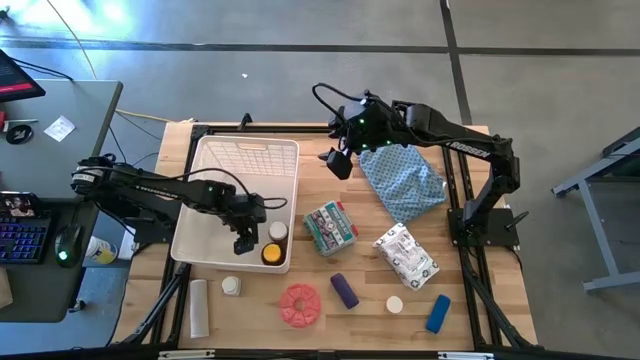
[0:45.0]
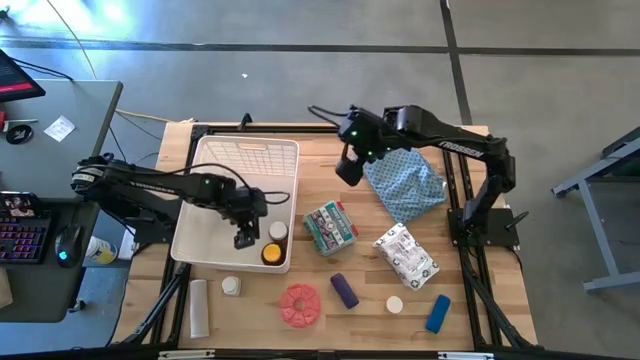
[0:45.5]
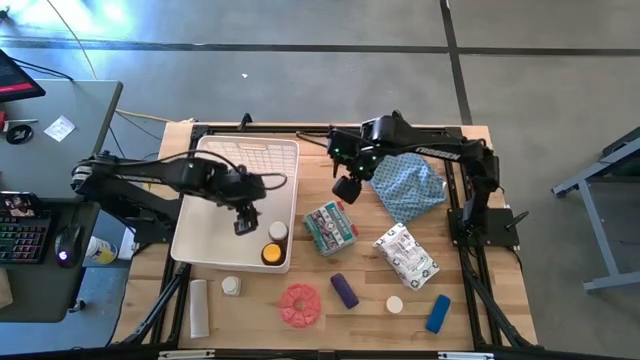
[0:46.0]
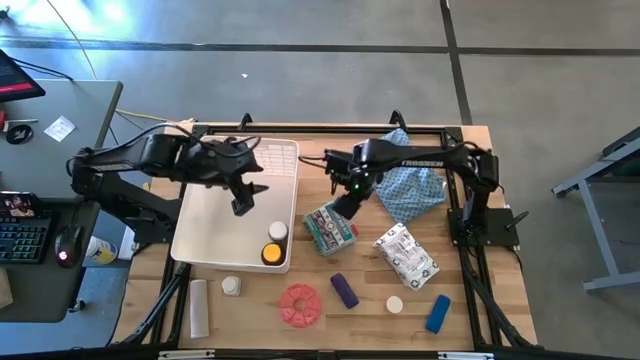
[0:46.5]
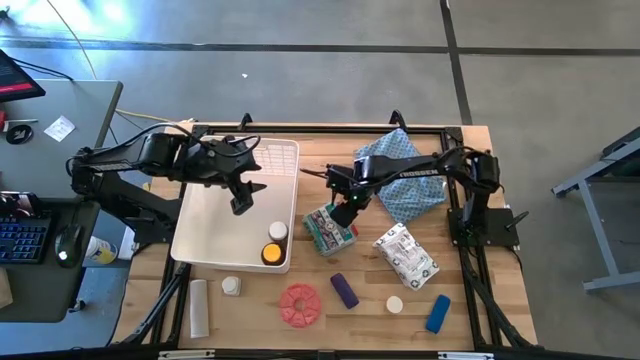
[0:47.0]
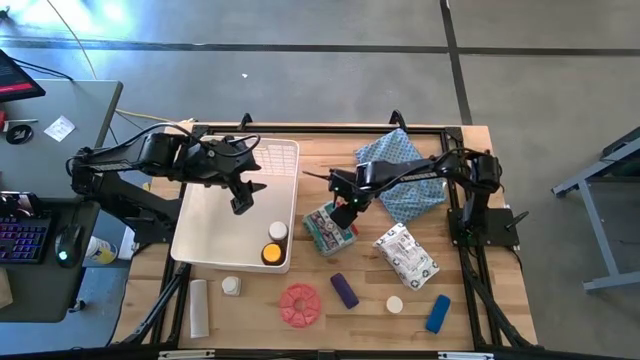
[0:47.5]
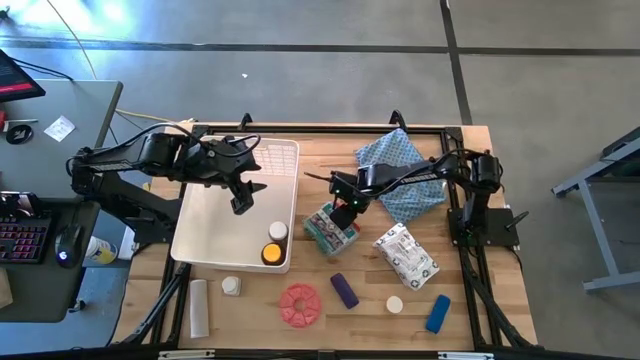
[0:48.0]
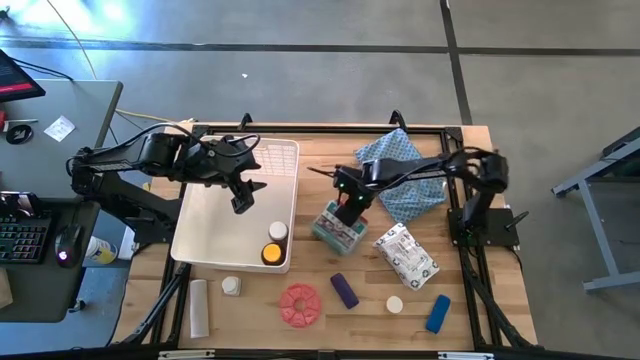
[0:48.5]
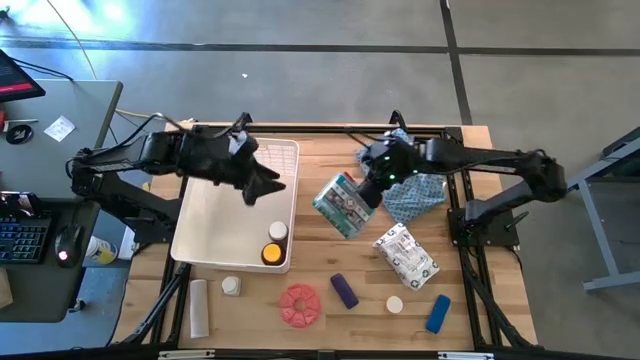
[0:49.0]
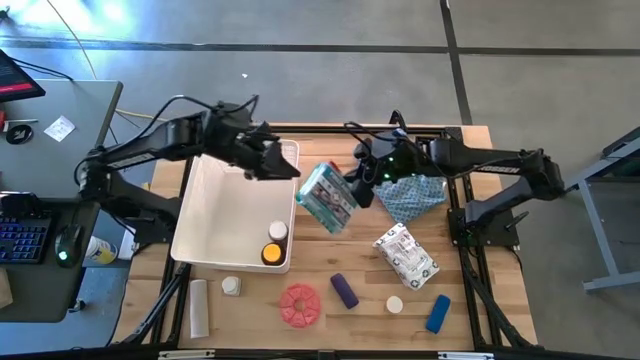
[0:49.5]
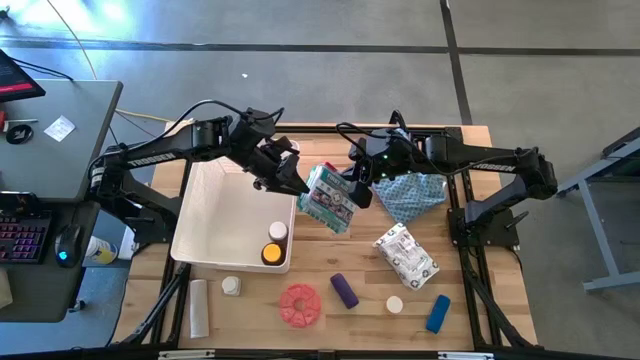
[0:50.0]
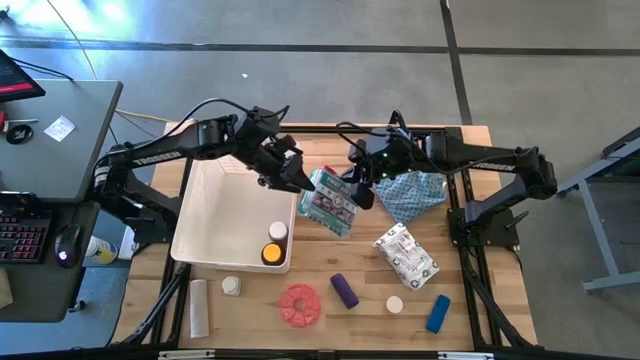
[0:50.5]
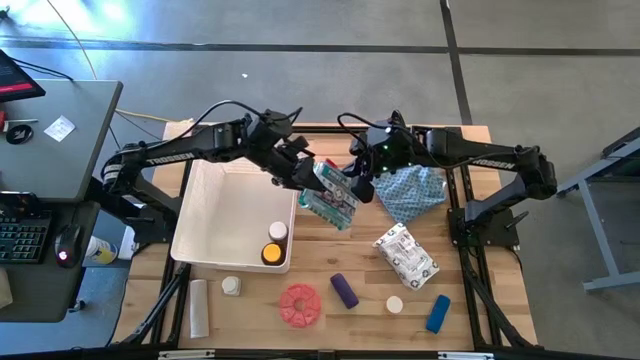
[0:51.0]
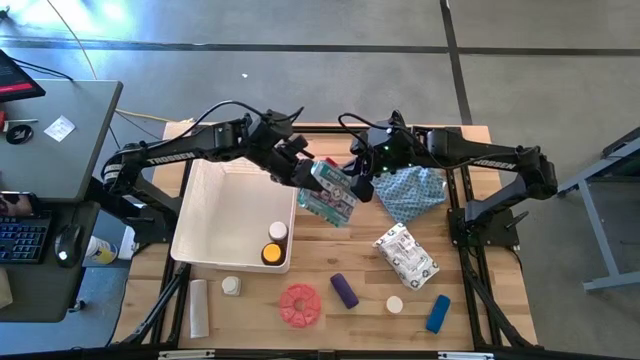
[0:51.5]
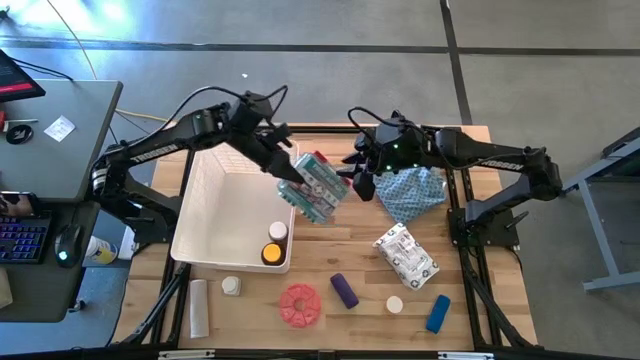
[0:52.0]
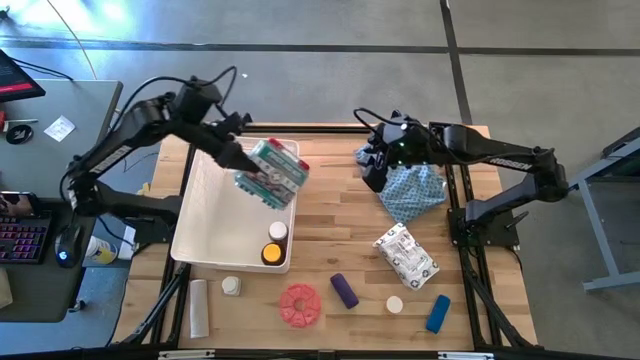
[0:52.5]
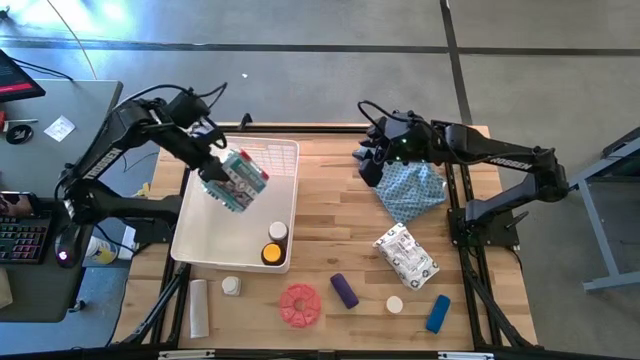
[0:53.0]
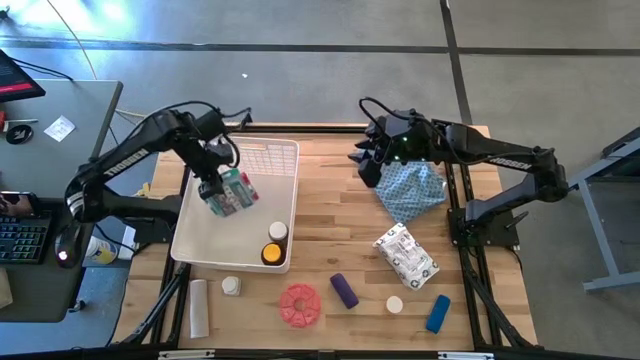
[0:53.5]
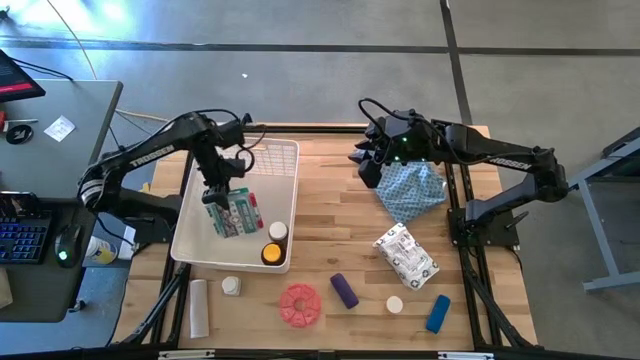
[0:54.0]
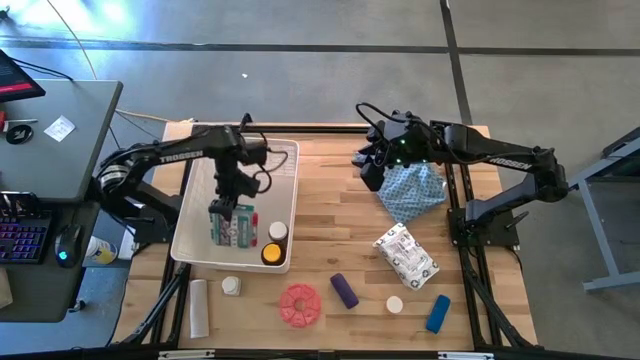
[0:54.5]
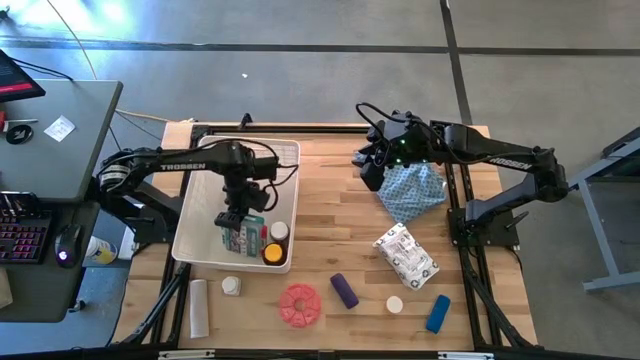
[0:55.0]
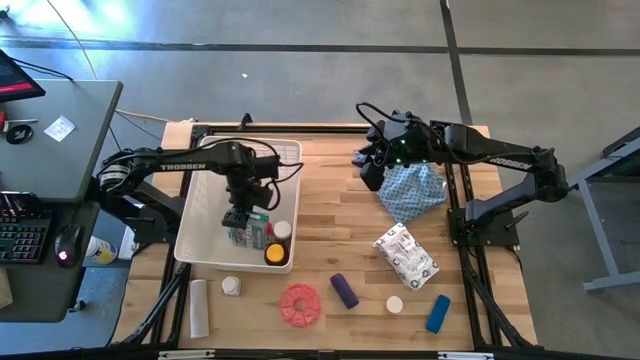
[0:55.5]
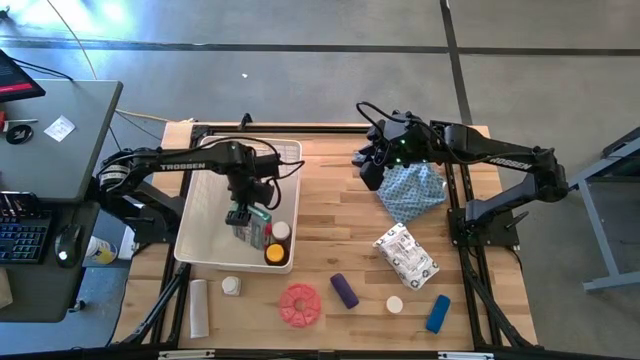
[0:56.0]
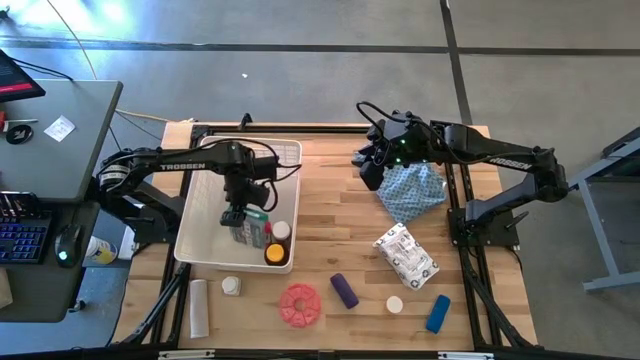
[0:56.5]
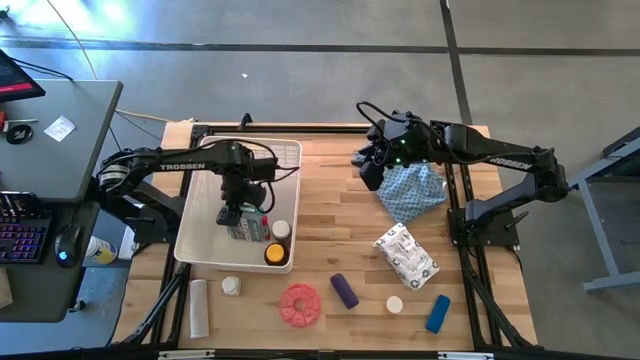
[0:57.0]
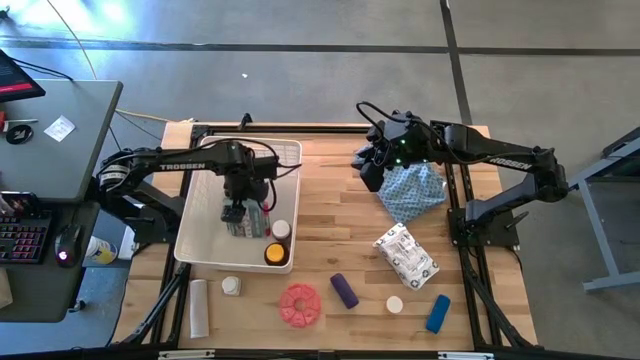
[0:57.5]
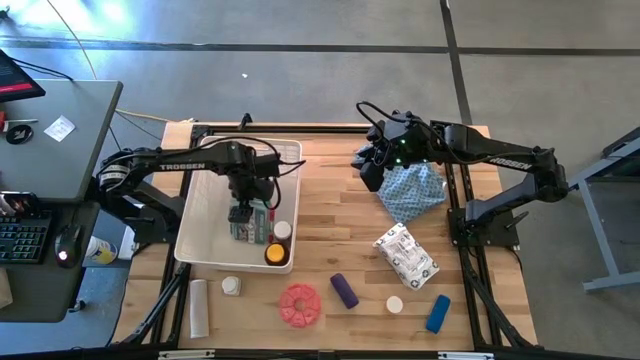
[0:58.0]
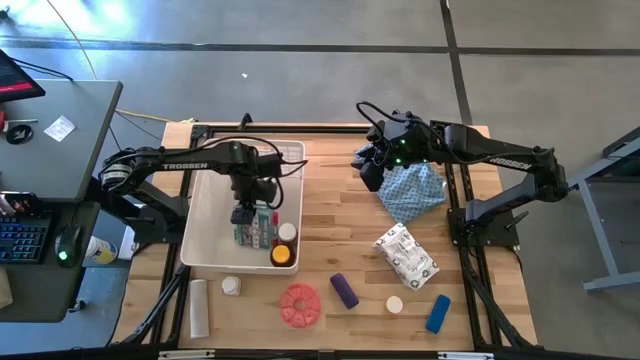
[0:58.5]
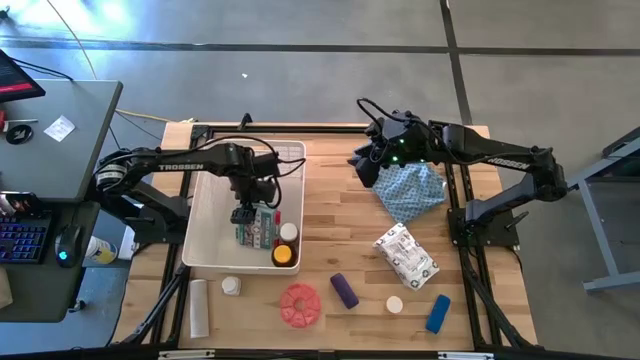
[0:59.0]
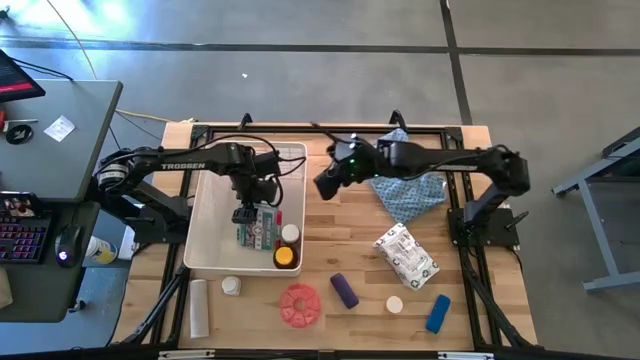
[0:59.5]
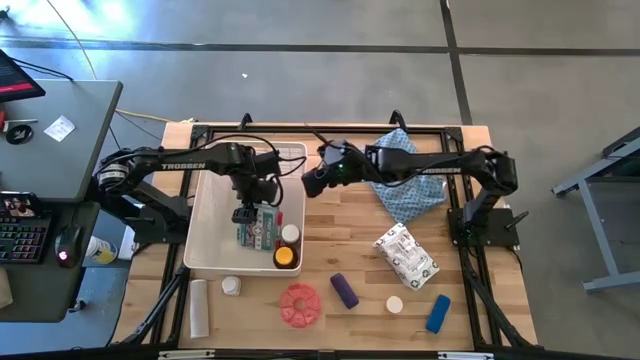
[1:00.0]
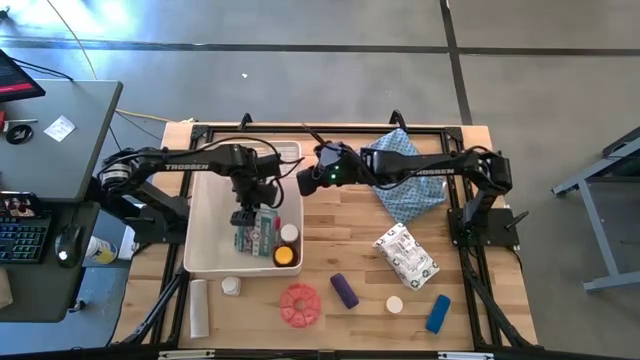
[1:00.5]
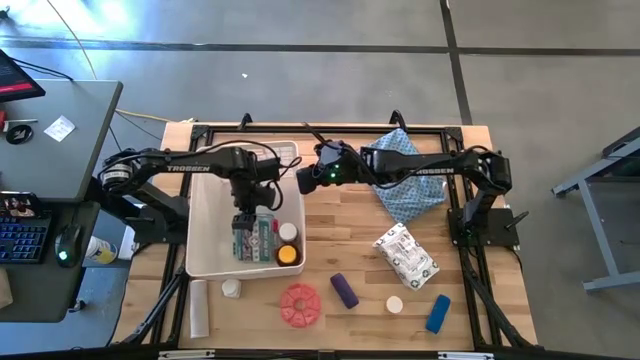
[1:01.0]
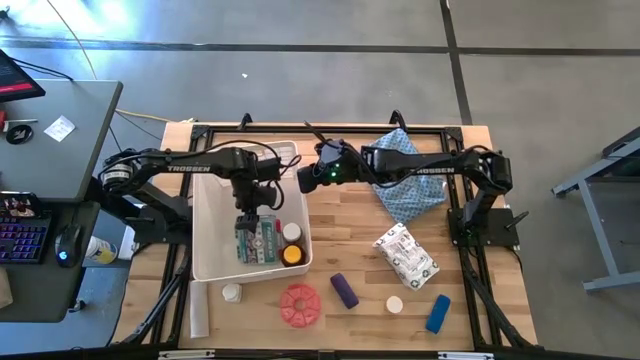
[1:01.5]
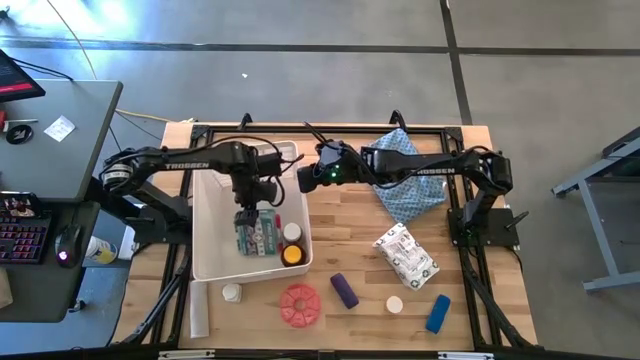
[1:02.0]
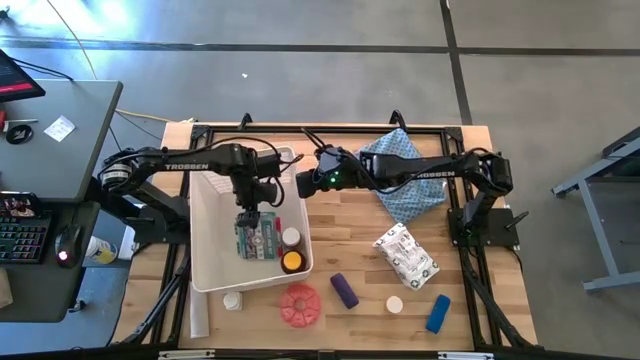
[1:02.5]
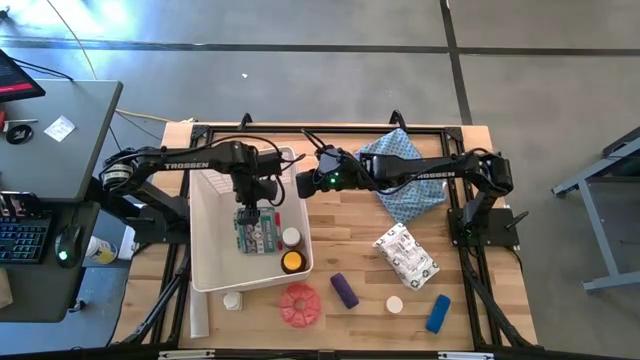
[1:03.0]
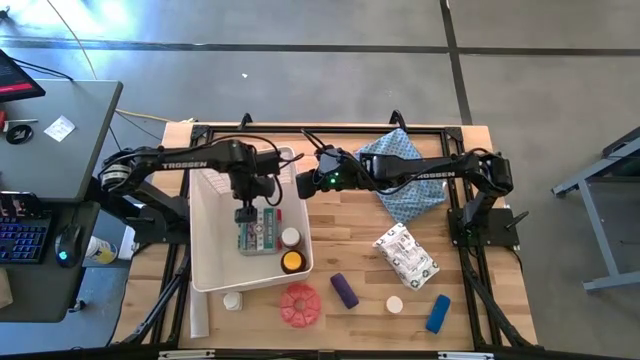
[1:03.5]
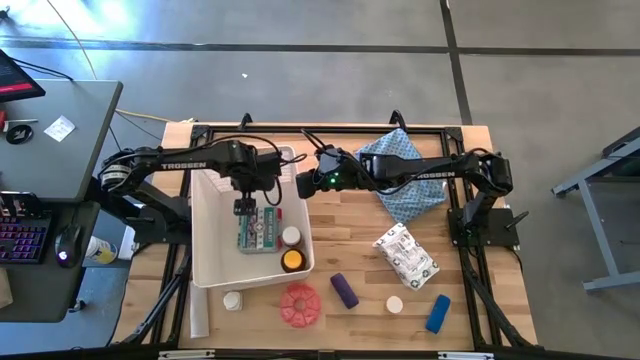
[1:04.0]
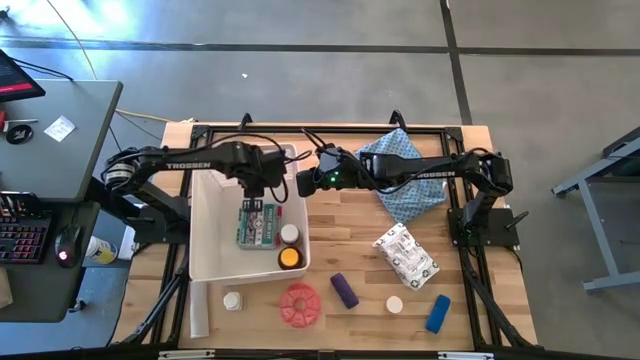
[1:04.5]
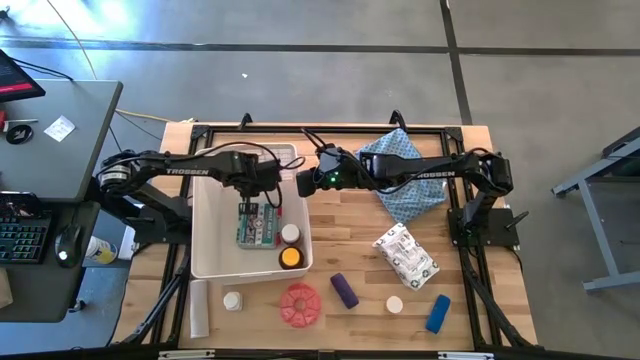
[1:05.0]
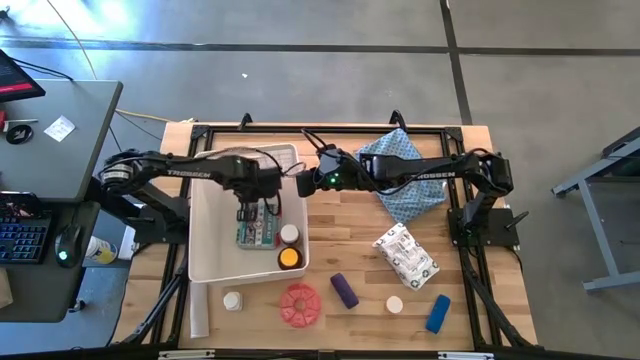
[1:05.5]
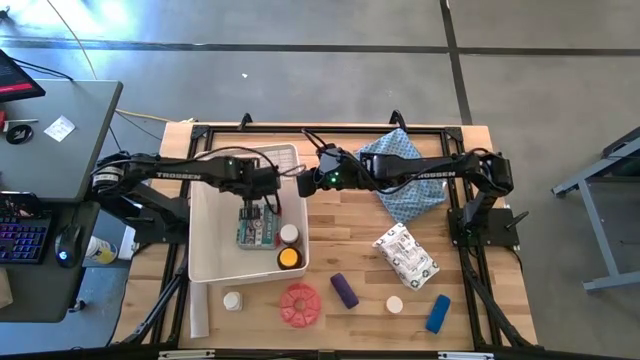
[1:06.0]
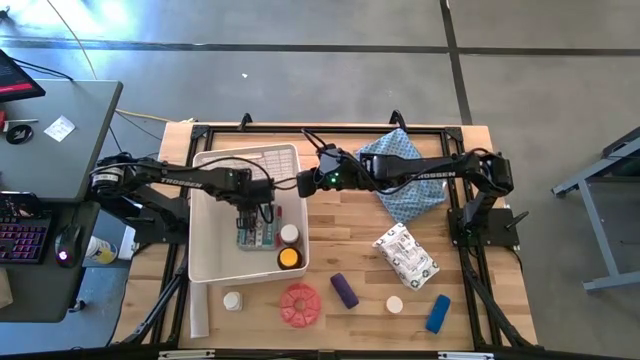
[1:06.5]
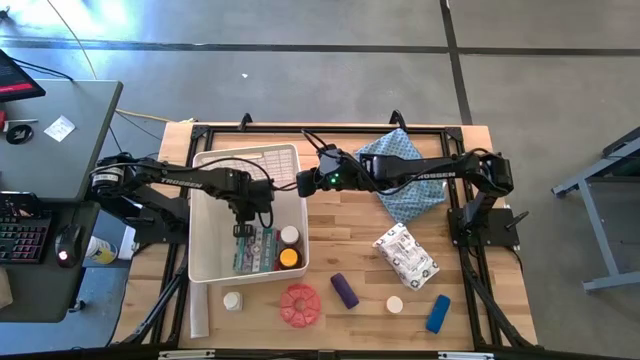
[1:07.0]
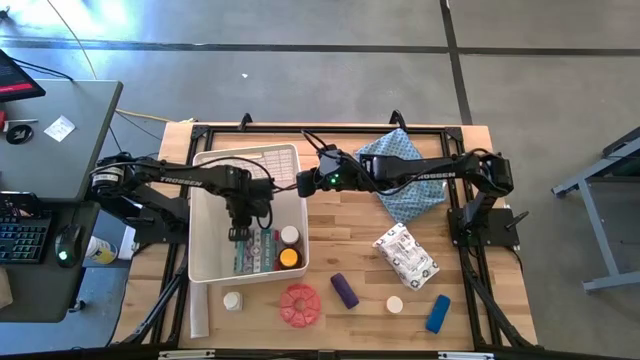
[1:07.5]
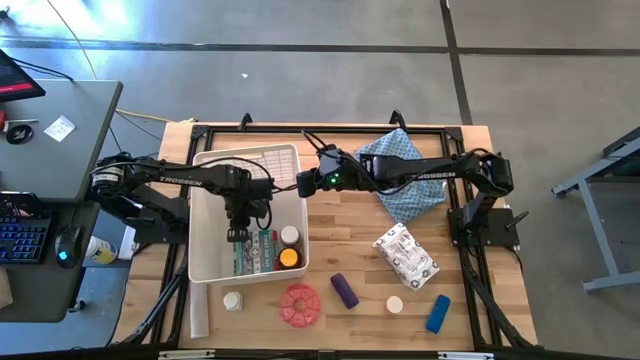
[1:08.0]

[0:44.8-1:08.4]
Task: Pick & place medical supplies in basket/bin
Put the blue first aid kit into the white bin
